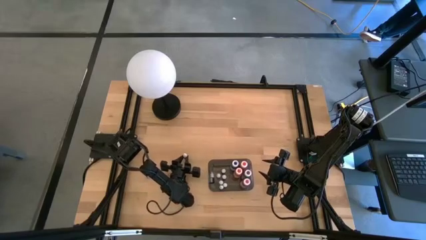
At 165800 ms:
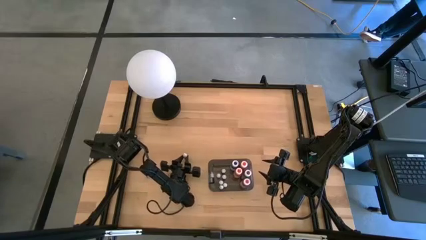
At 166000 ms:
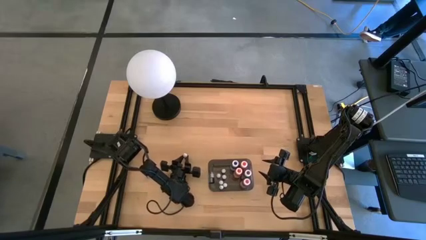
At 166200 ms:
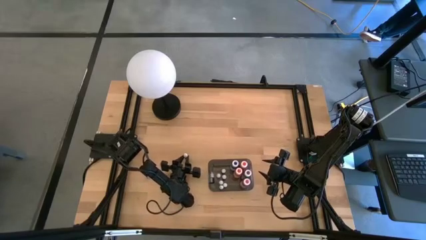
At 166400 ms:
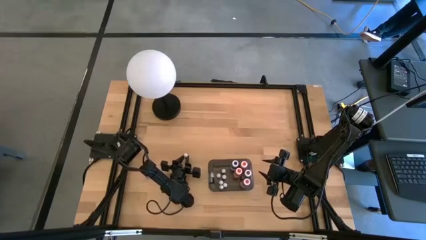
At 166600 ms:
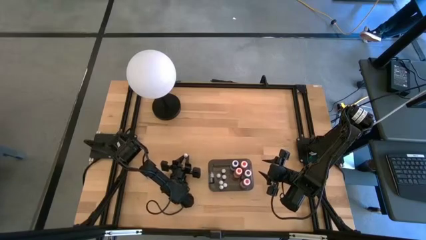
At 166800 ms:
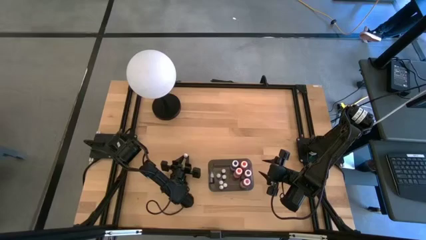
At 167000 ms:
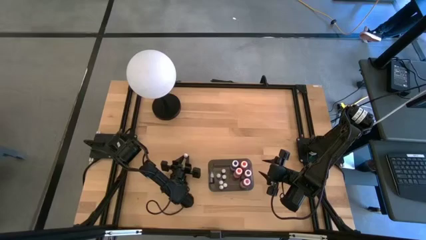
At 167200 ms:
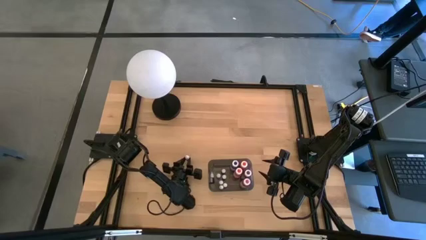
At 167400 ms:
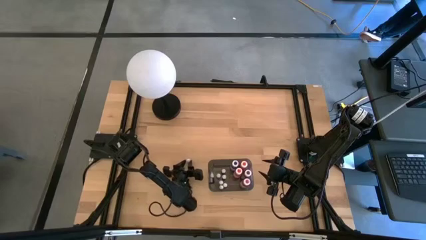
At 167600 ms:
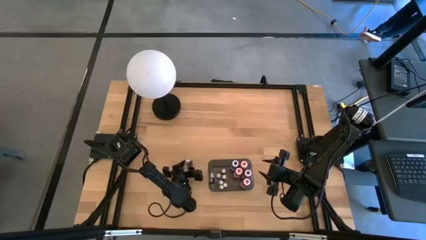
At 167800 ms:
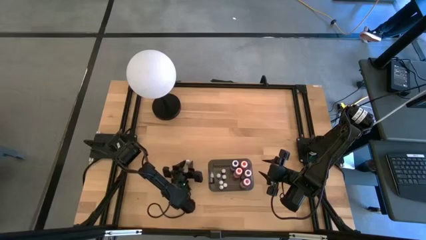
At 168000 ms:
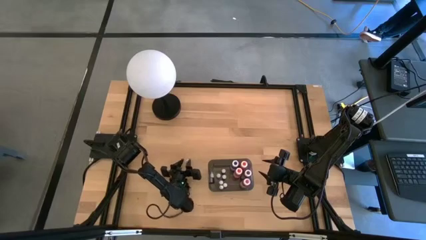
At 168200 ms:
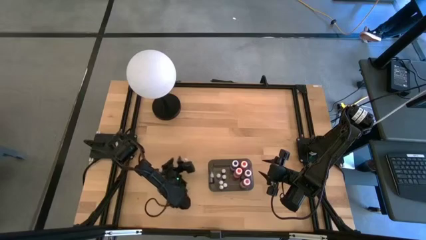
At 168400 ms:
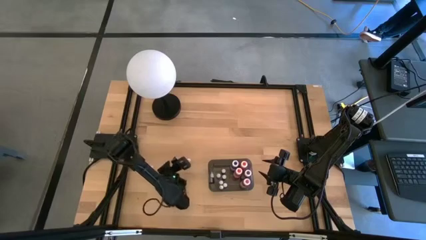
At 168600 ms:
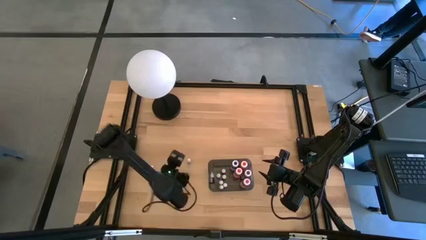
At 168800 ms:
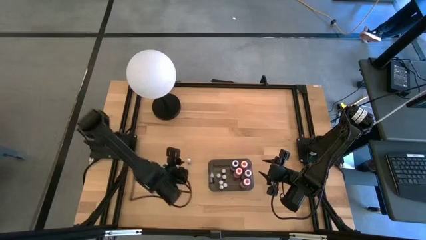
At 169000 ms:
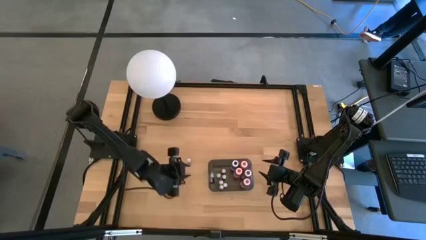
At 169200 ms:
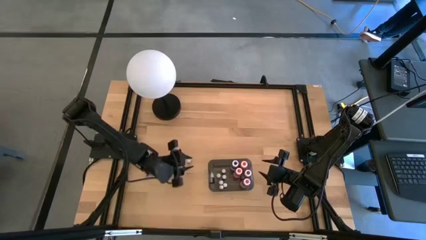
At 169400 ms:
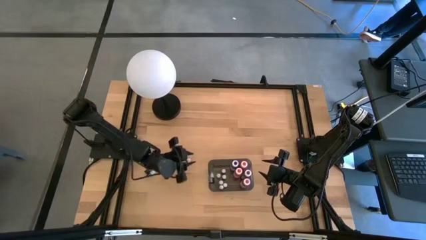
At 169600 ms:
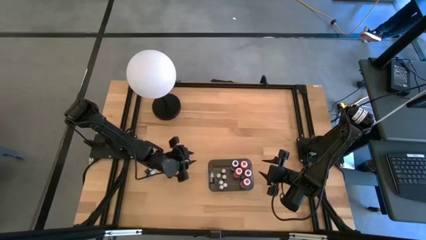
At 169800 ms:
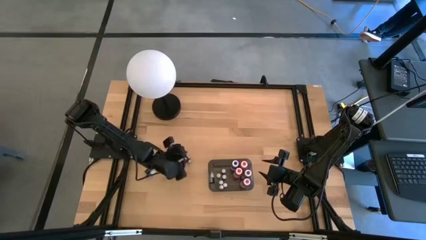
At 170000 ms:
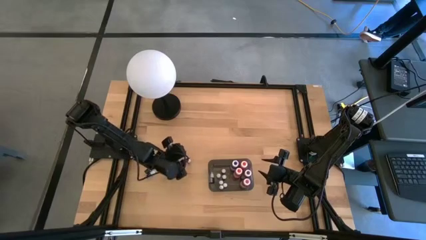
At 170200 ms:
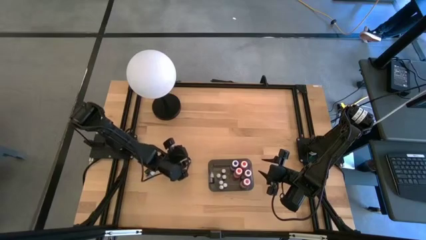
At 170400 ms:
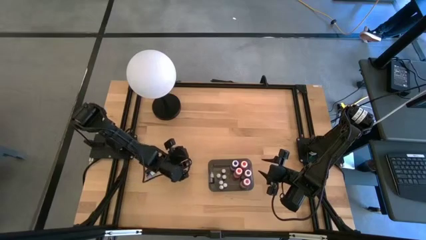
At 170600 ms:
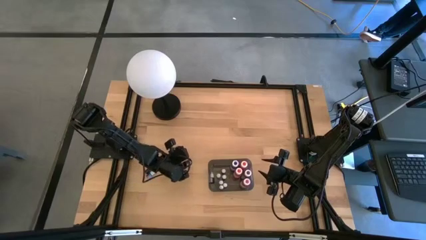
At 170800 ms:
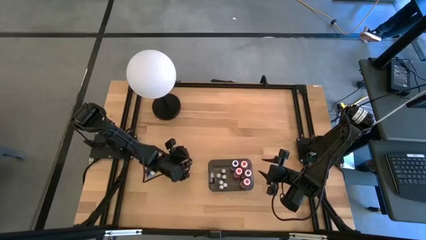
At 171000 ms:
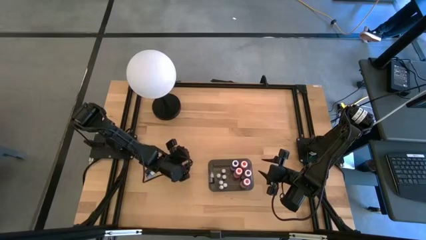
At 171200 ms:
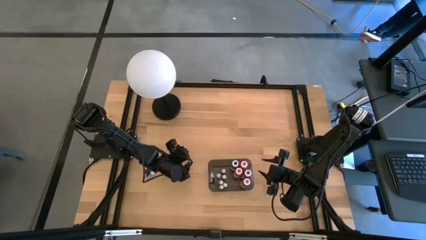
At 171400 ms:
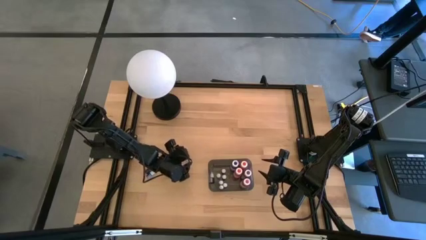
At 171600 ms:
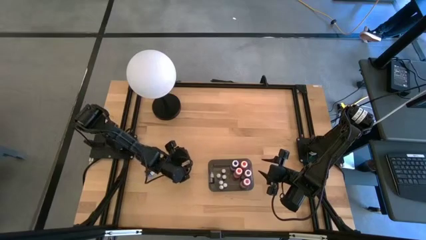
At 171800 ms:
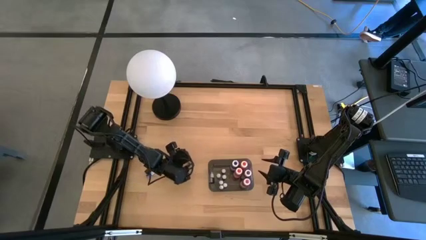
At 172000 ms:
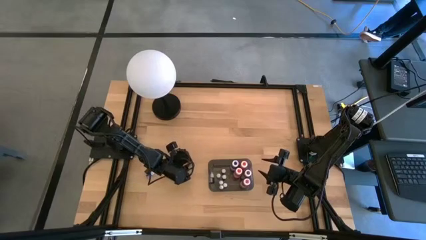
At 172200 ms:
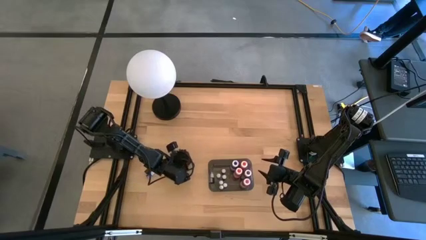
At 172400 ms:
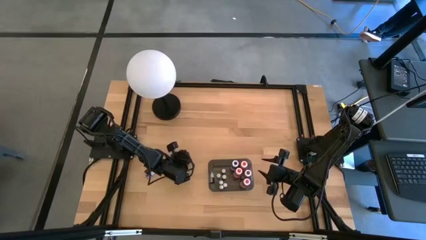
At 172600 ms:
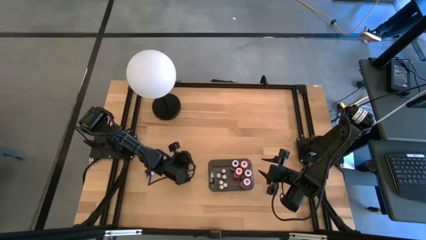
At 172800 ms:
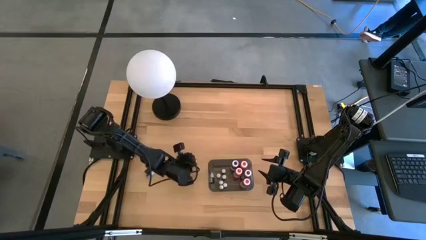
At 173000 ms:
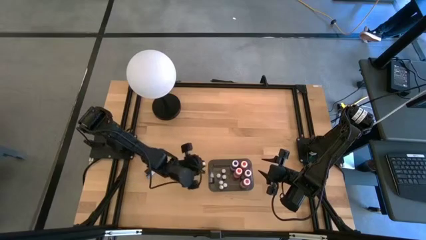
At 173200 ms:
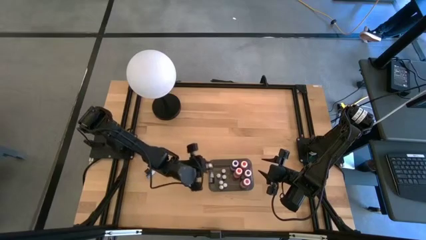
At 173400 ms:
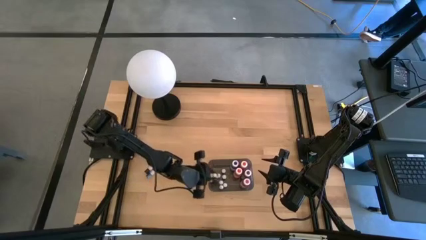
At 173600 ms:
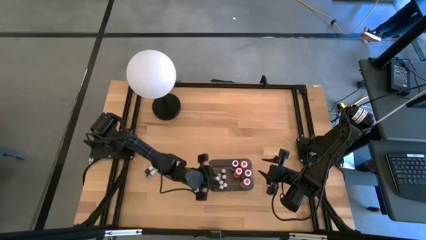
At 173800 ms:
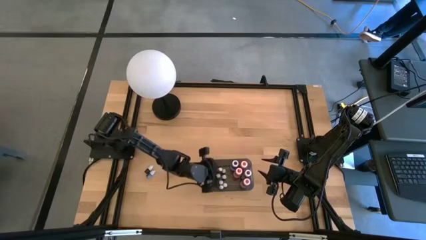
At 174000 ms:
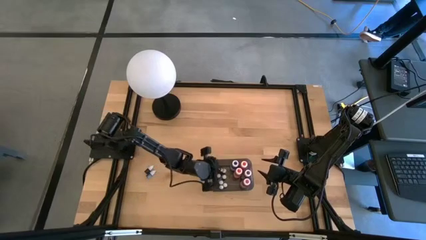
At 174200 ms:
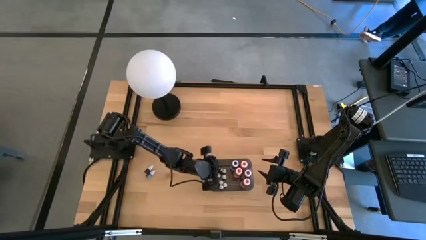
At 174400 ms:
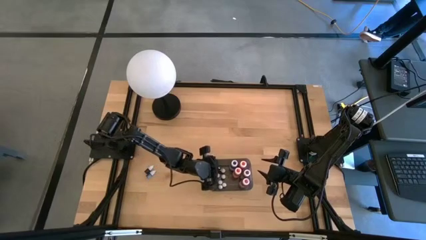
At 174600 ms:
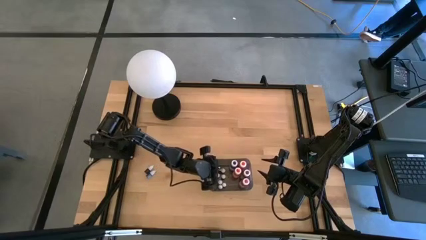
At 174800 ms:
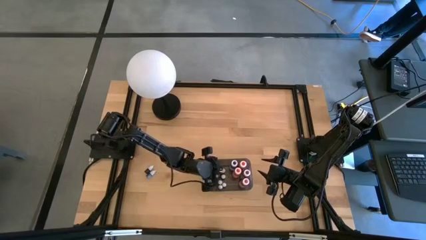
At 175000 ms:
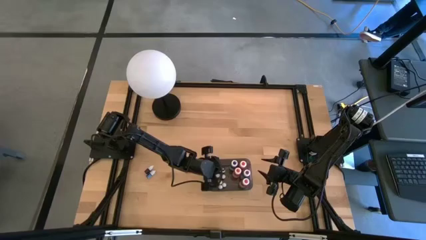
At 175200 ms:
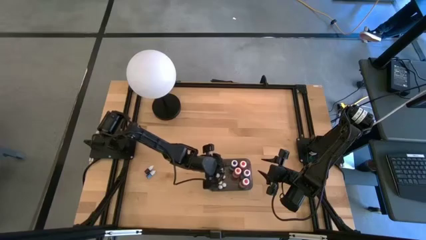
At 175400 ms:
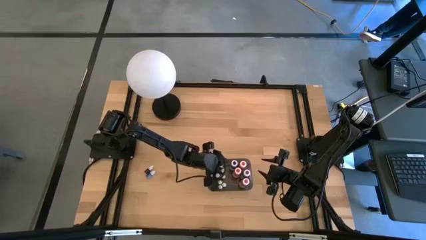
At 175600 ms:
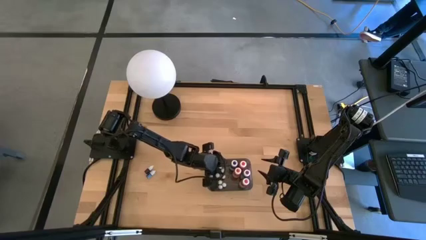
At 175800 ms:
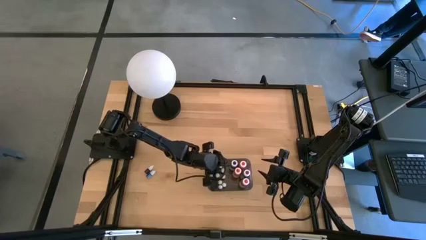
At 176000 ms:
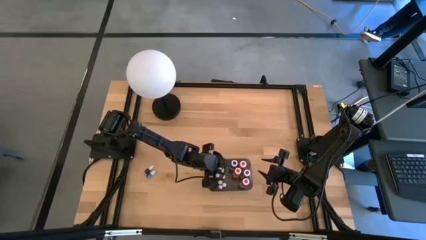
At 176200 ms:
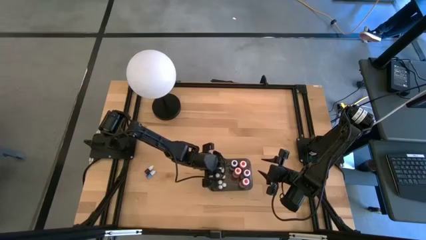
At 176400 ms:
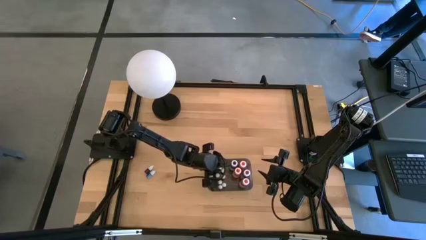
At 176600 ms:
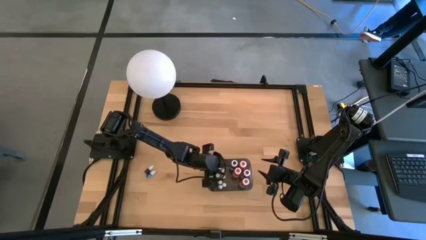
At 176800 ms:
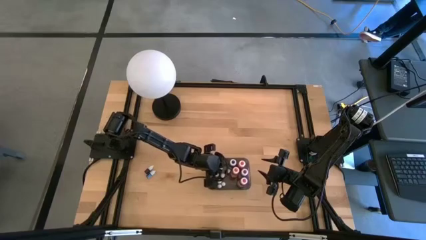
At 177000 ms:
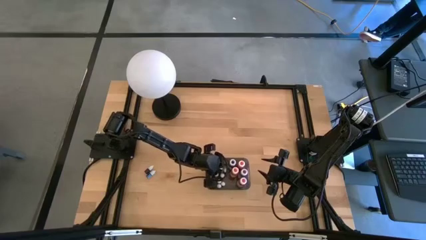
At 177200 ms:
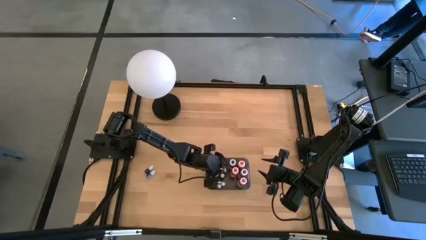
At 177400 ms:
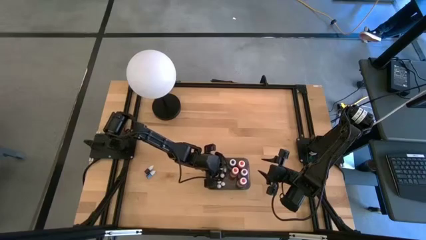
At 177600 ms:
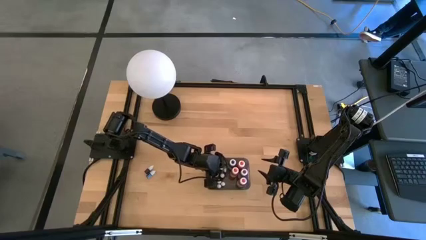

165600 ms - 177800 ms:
Task: Pick & Place food coloring
Put the small food coloring bottle into the black bin

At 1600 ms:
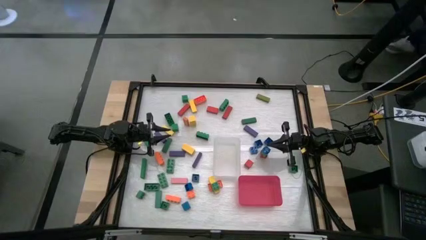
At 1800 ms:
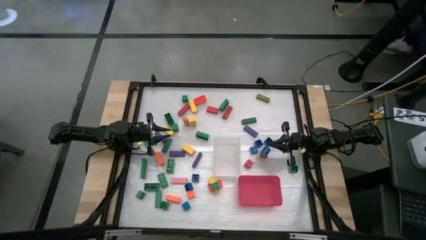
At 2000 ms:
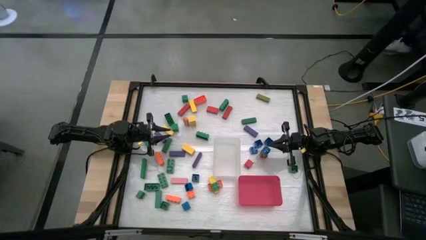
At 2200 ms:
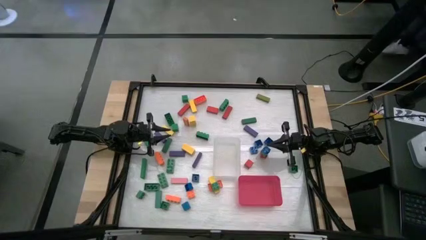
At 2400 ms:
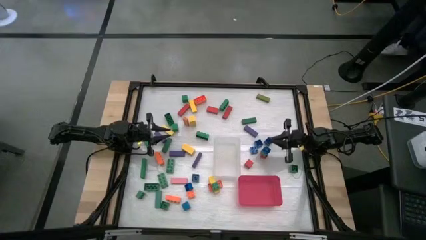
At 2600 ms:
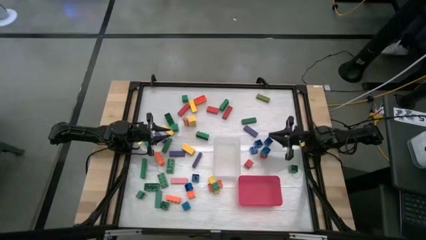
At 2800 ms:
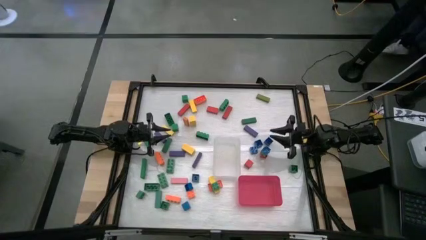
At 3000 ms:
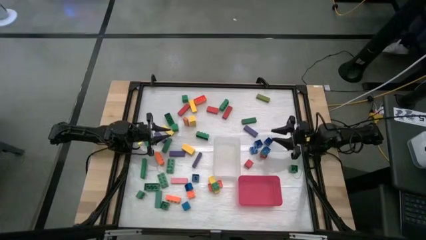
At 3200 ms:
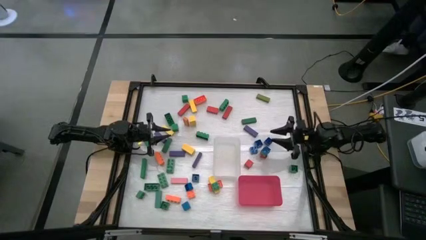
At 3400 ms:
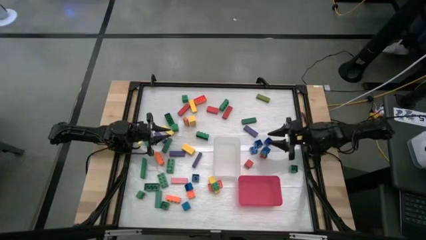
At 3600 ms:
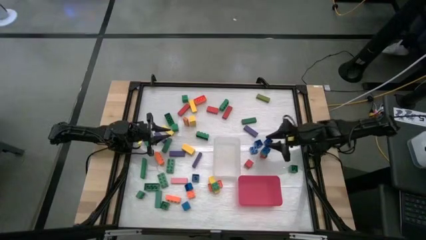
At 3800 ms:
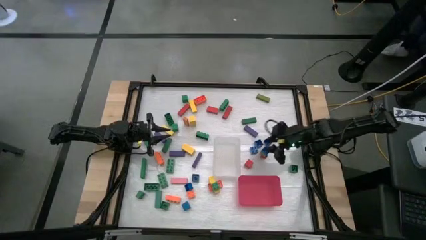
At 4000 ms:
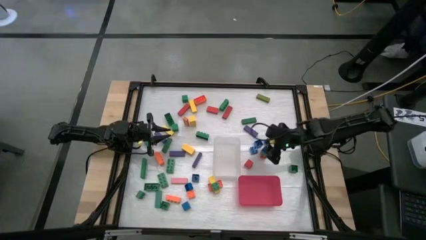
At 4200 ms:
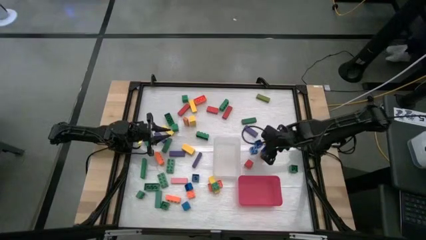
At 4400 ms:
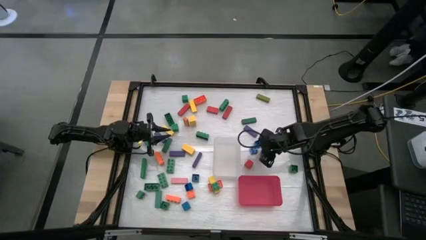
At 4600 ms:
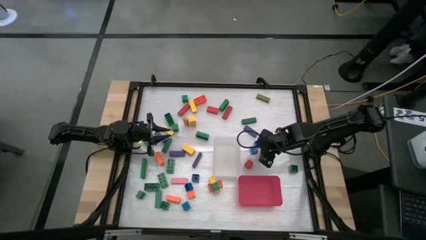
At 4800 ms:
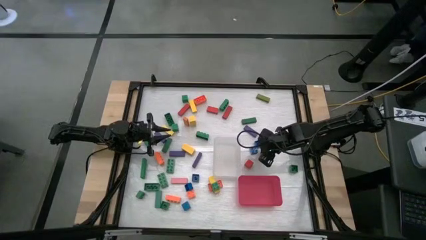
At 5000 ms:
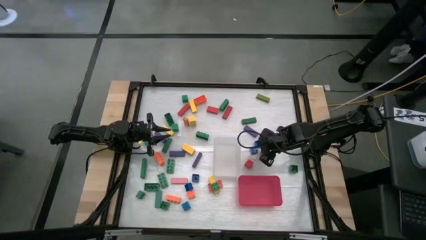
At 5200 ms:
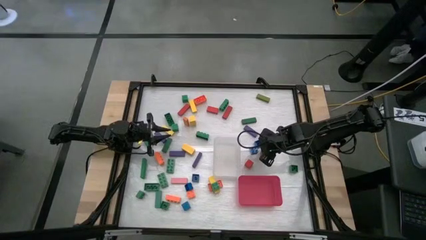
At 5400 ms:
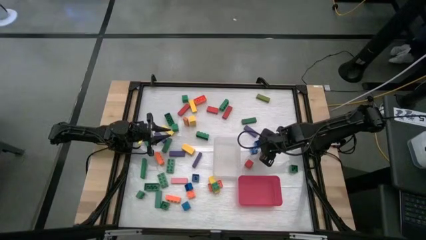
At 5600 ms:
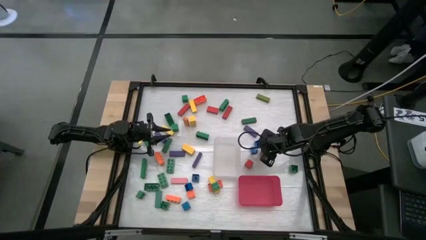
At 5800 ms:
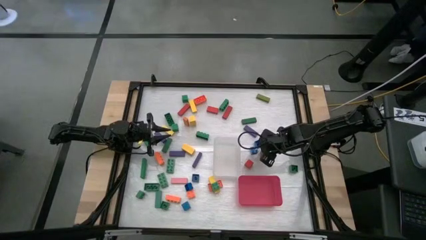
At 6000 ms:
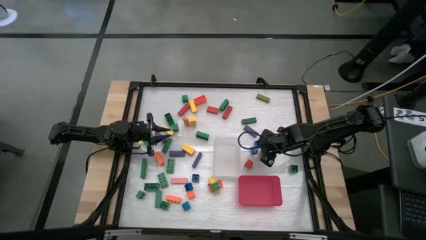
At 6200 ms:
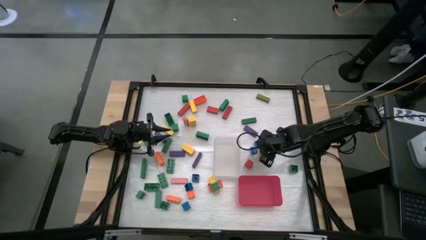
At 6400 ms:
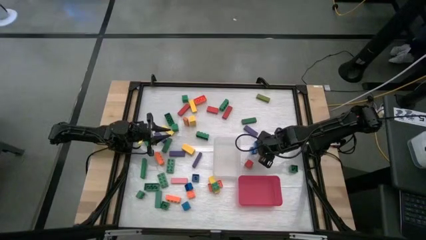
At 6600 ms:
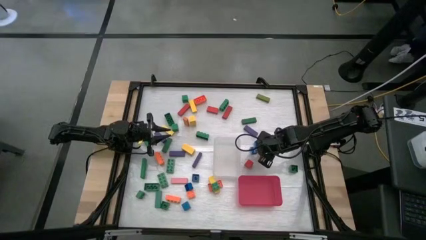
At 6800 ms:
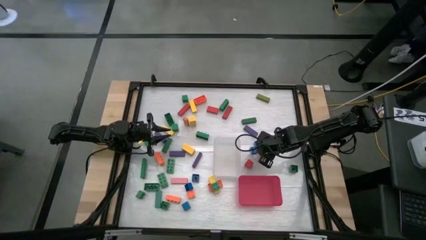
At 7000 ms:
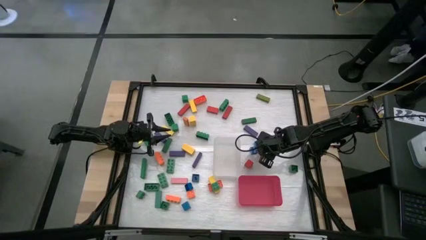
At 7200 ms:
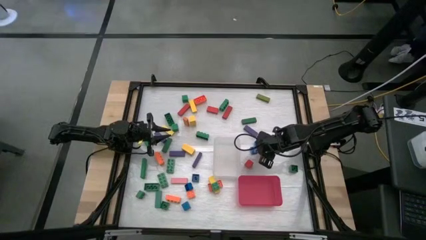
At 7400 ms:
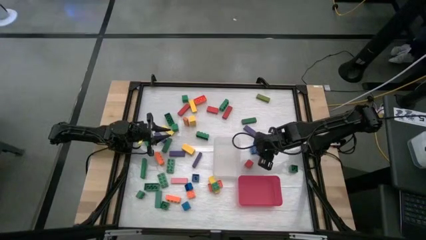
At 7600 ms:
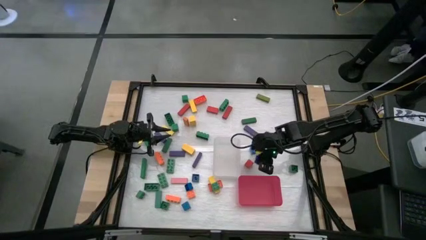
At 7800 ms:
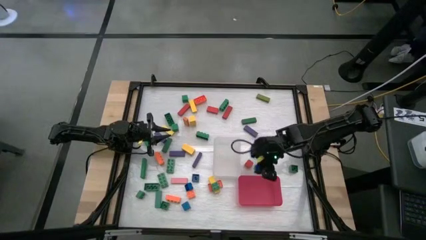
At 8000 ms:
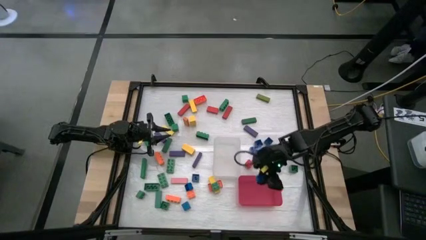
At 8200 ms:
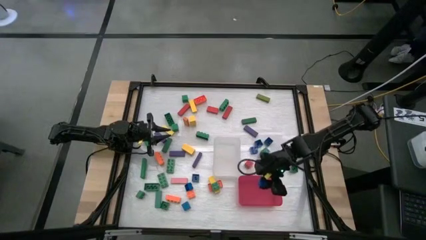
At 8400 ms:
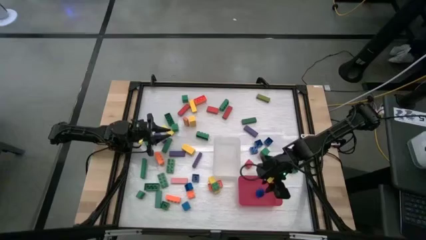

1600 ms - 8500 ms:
Task: Sort blocks by size
Put the blue square game piece into the red bin
